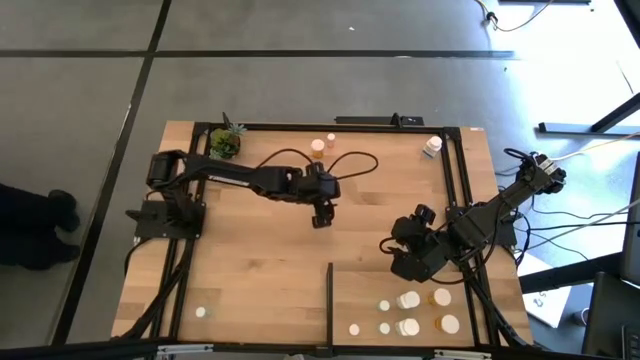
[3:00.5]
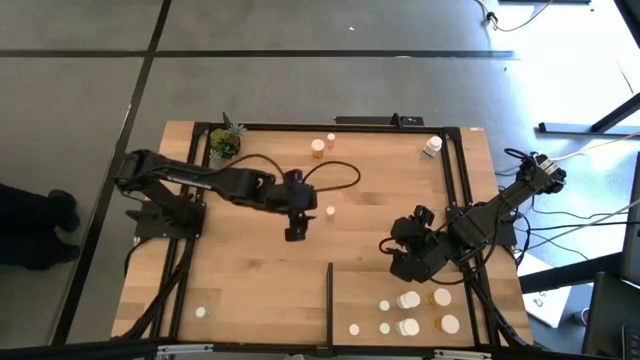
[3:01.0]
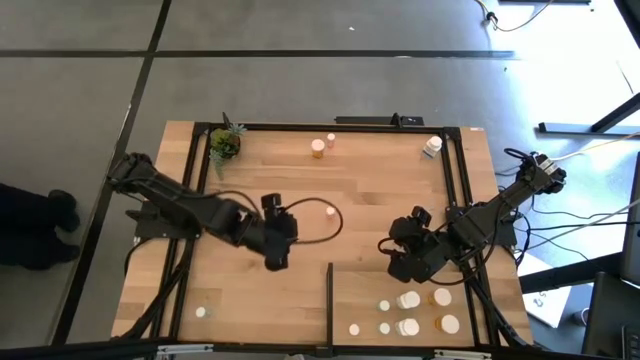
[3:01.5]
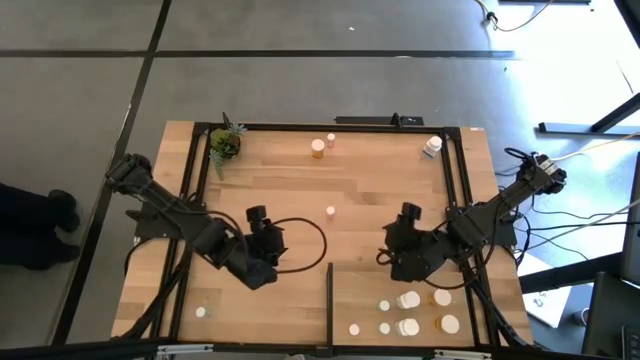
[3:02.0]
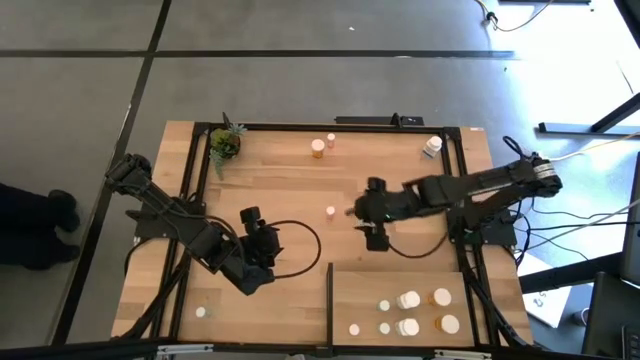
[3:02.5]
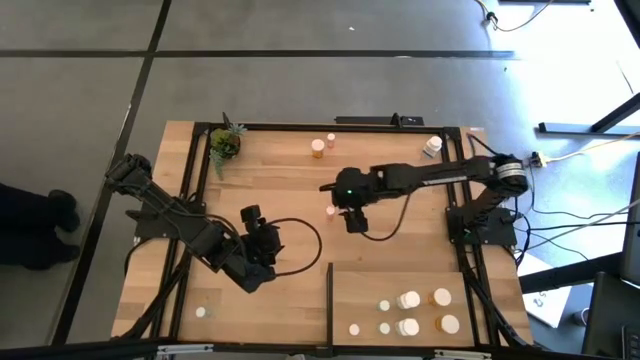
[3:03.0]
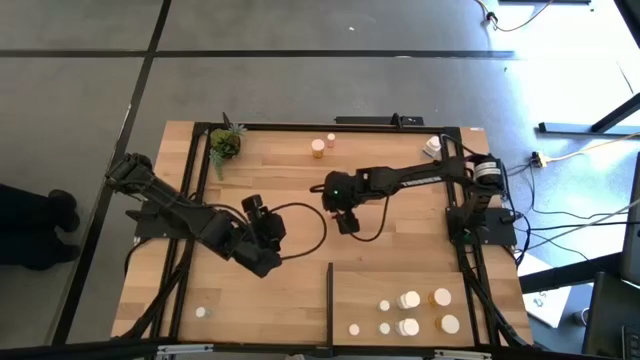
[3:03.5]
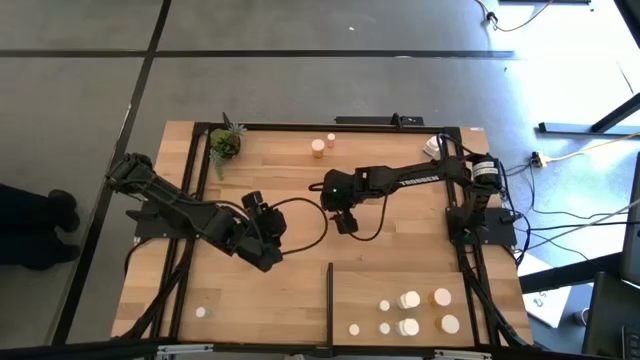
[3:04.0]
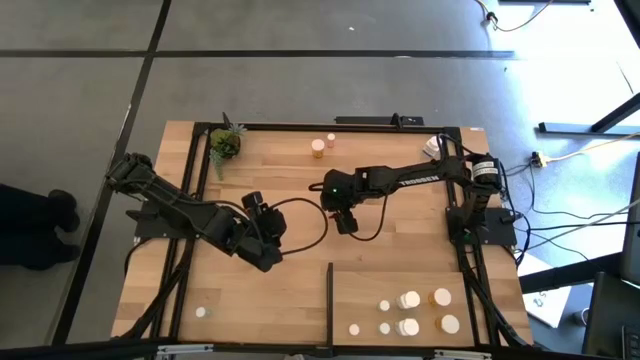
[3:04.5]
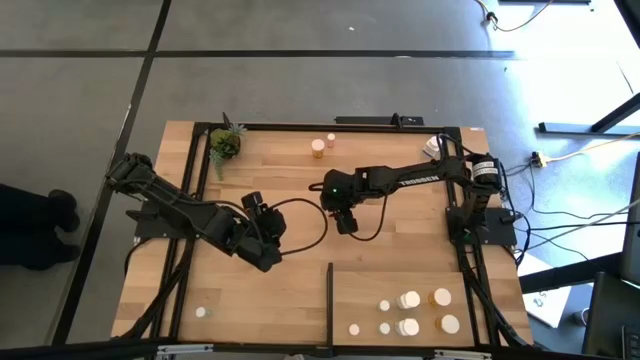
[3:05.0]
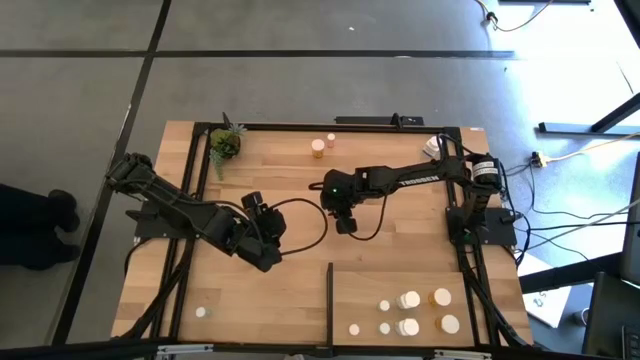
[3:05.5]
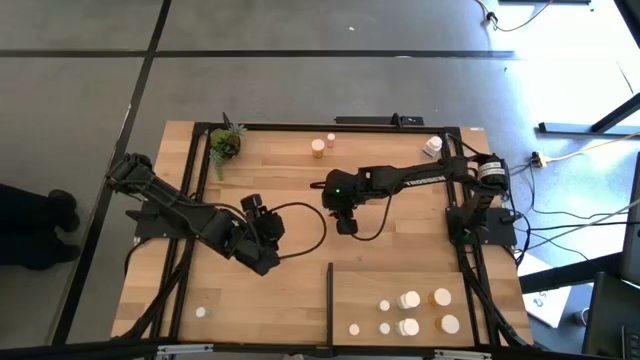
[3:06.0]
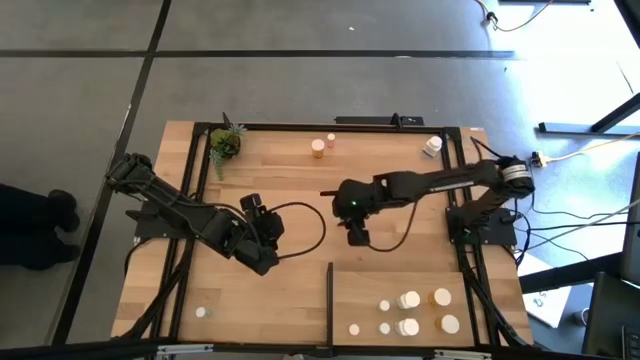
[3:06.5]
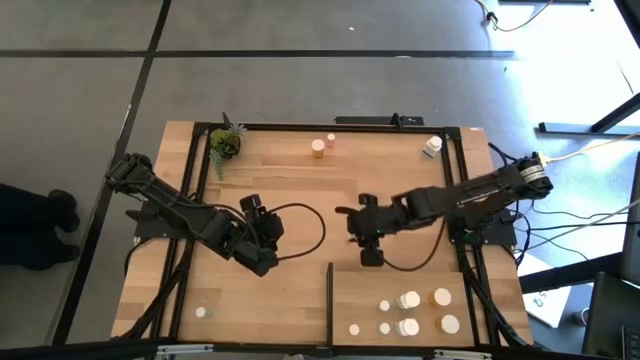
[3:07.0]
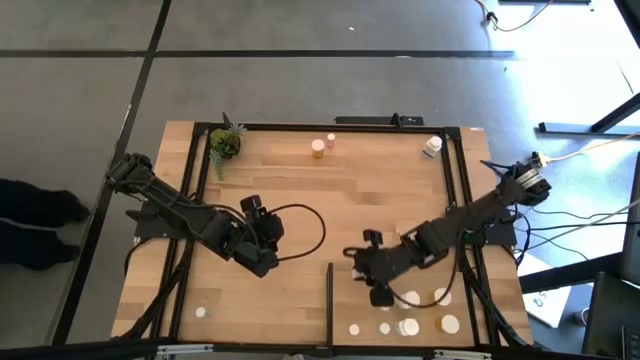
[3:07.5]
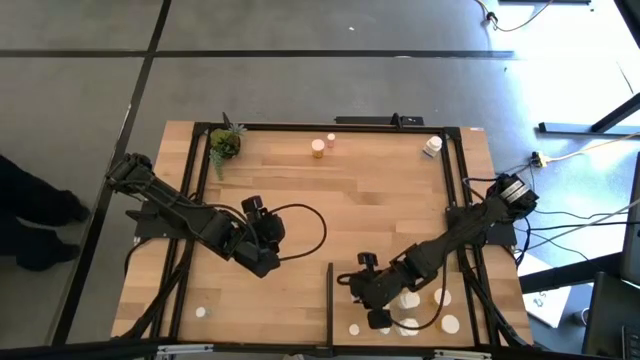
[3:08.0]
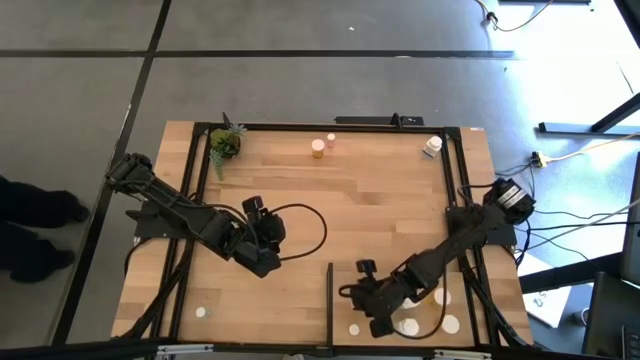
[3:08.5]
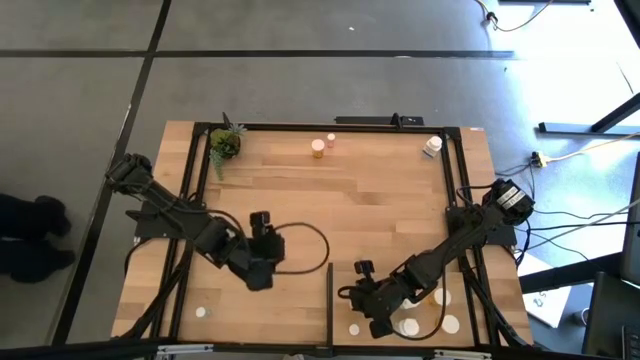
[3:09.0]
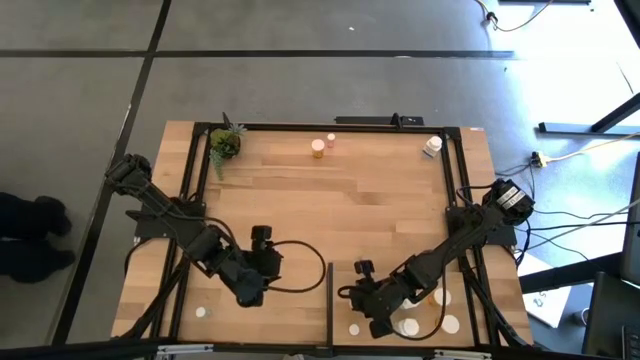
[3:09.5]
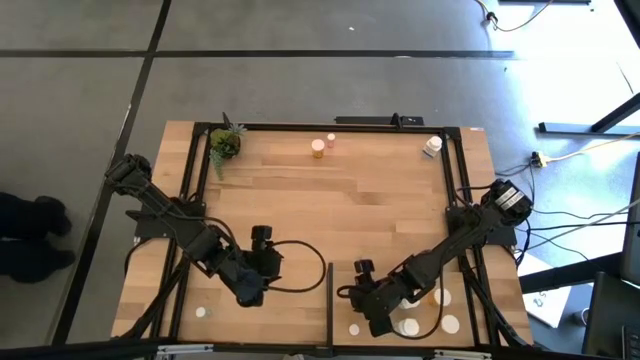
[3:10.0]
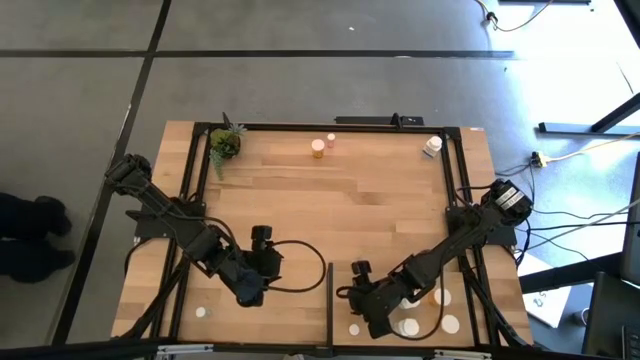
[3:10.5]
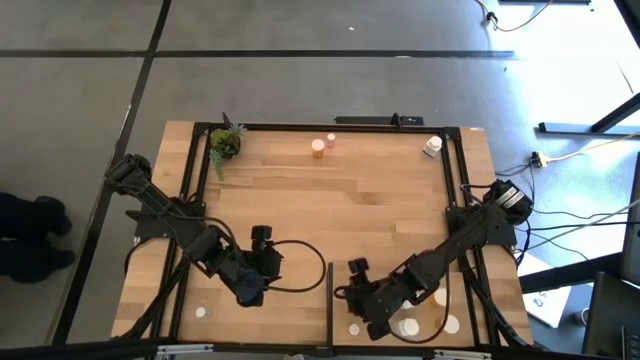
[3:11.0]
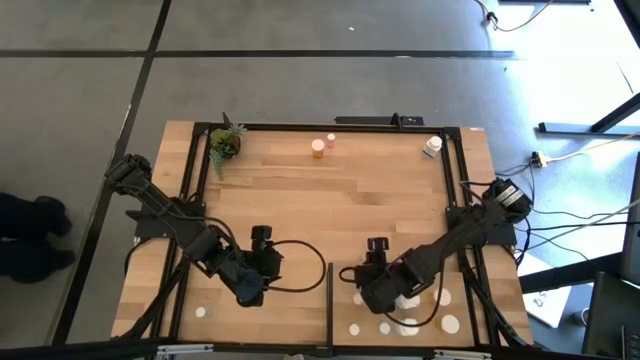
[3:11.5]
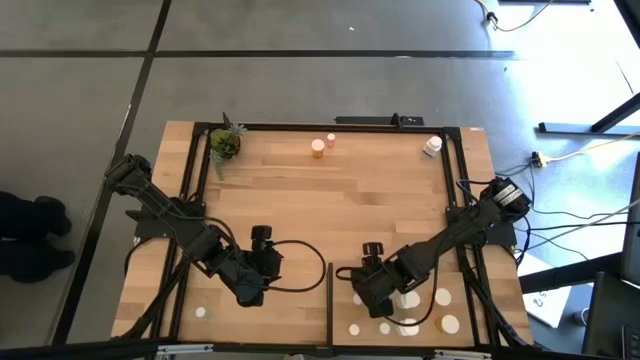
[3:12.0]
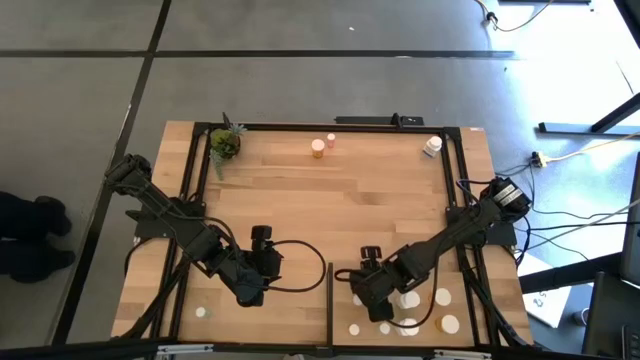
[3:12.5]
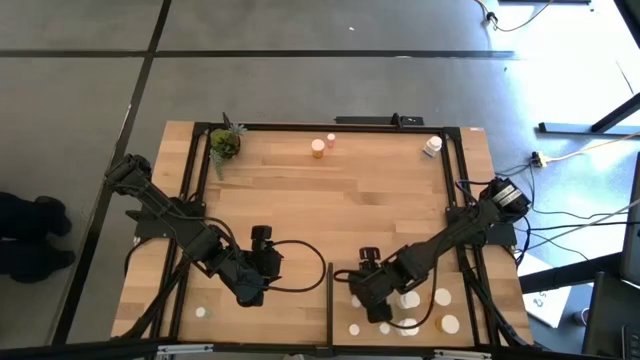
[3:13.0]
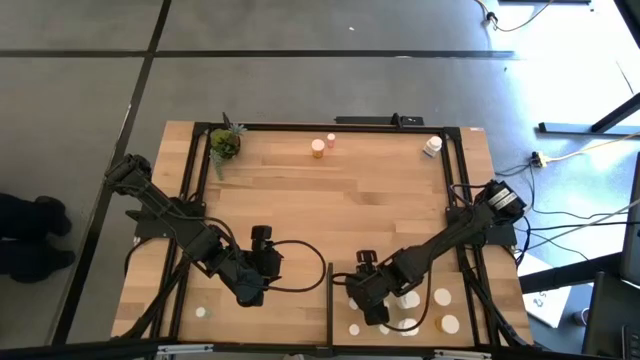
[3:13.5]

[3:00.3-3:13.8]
Task: Pick and place medicine bottles onto shelf by color
Put the bottom pink pill bottle on the shelf aligned with the other pink pill bottle

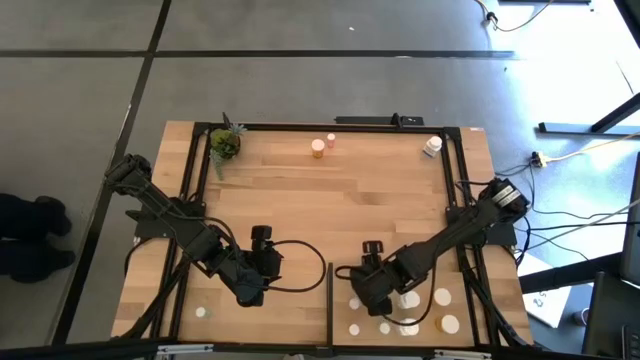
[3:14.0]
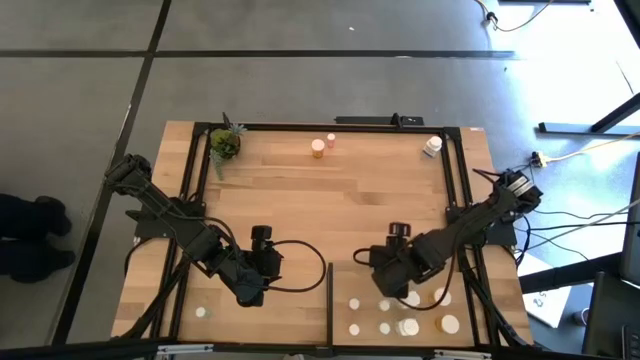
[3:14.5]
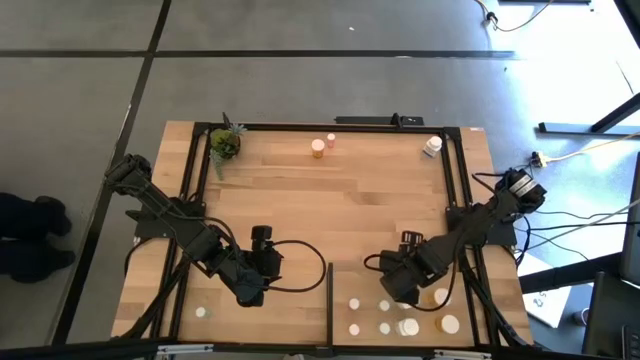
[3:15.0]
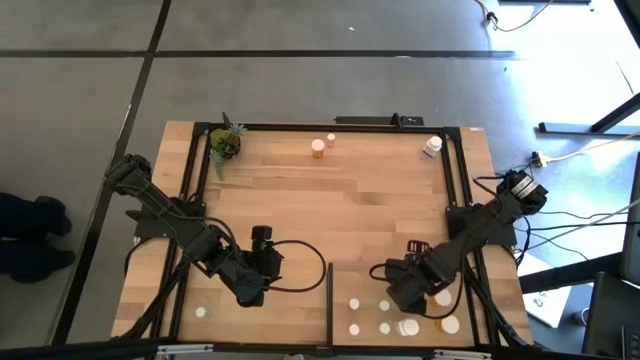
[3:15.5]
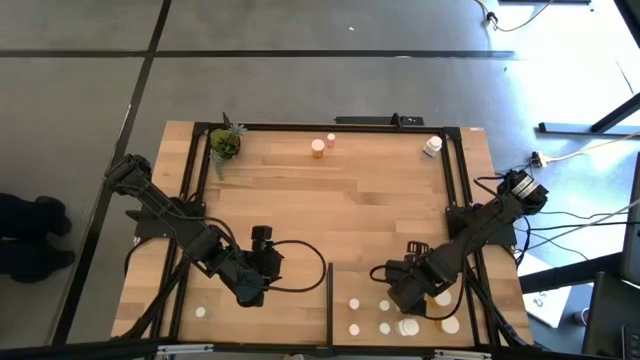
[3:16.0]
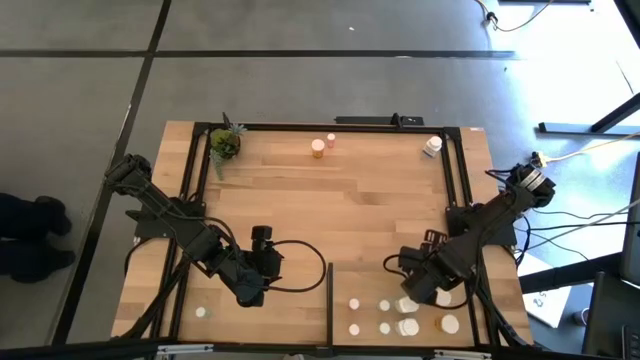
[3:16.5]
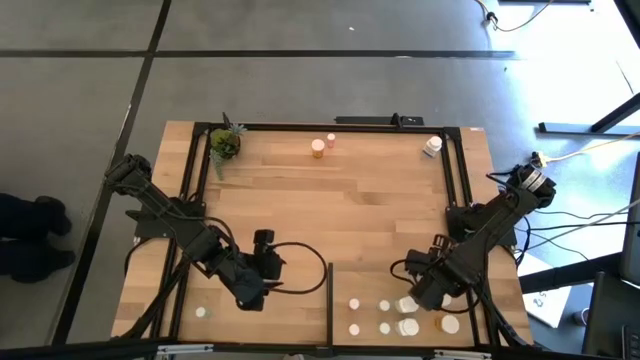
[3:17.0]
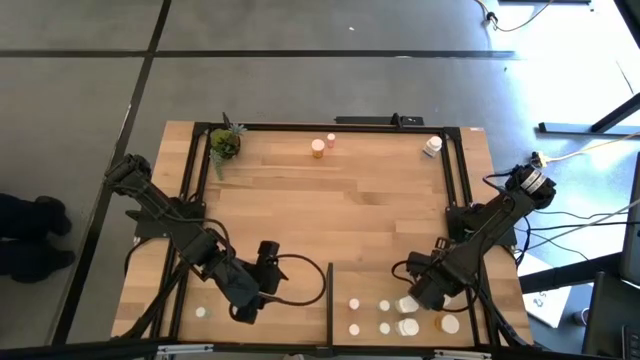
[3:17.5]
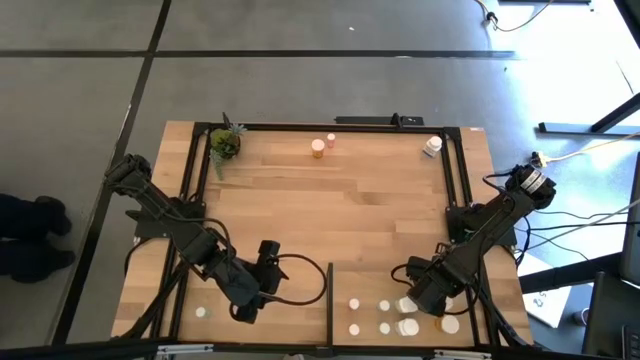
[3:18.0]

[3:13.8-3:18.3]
Adjust the pill bottles on the shelf

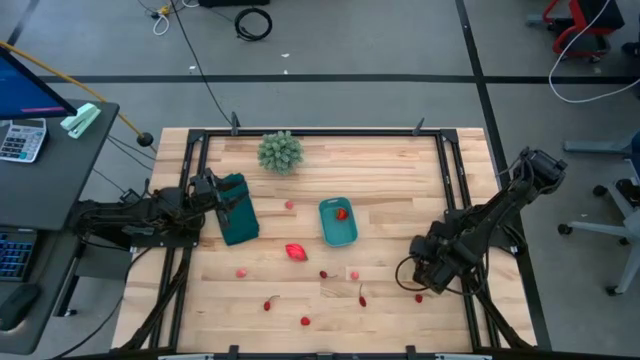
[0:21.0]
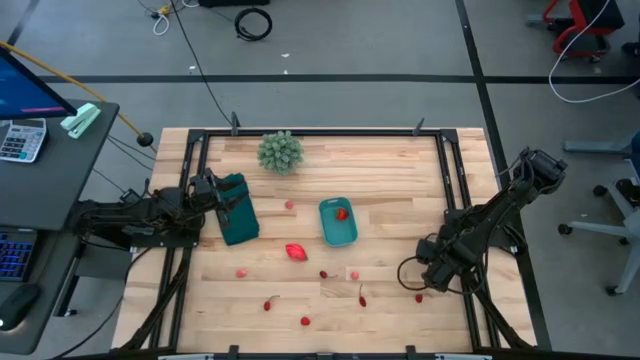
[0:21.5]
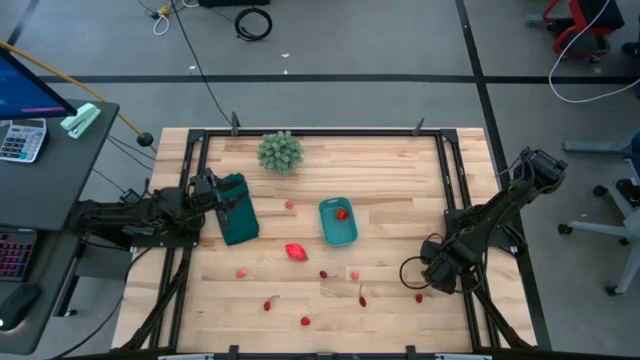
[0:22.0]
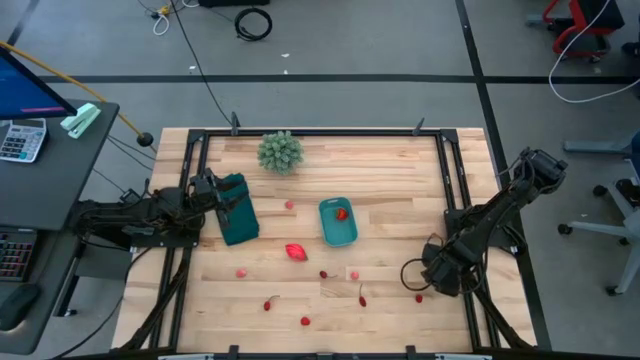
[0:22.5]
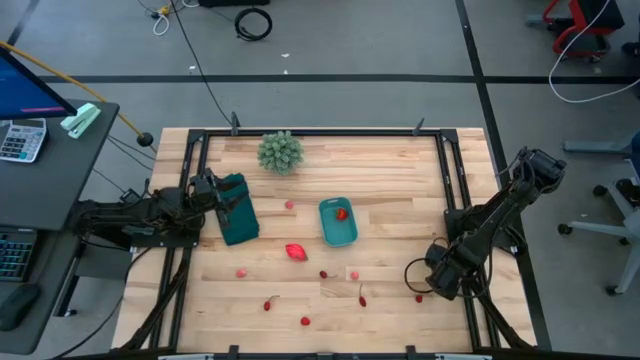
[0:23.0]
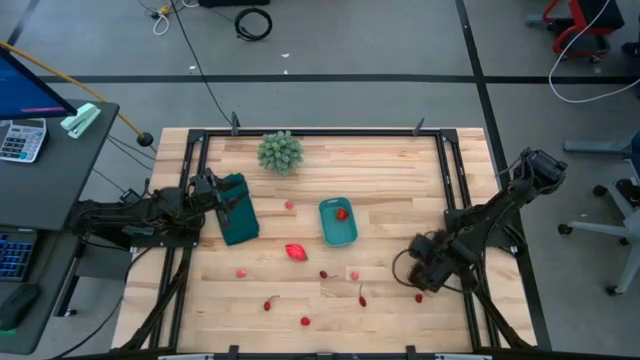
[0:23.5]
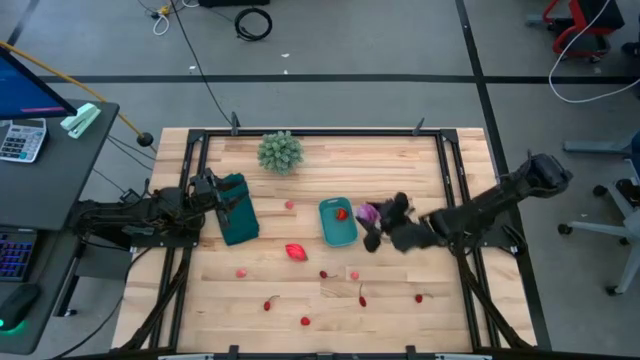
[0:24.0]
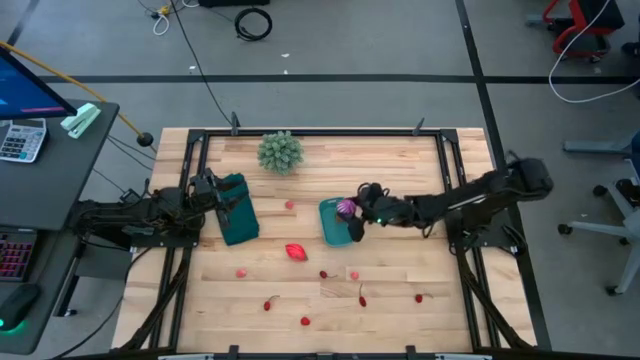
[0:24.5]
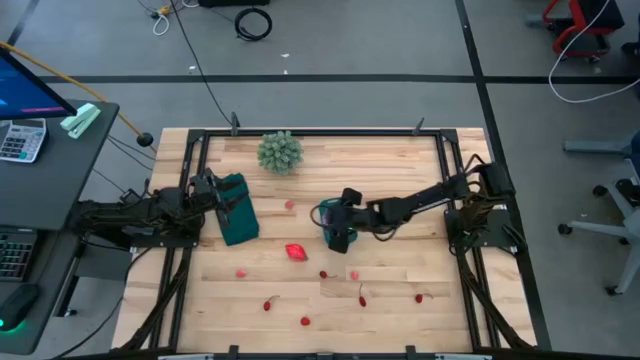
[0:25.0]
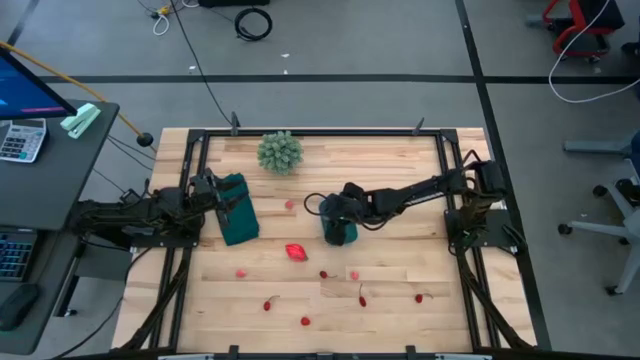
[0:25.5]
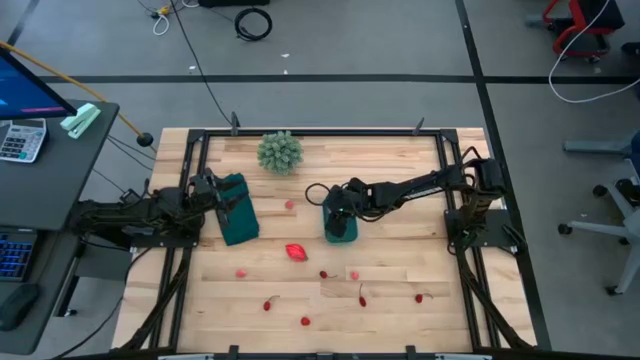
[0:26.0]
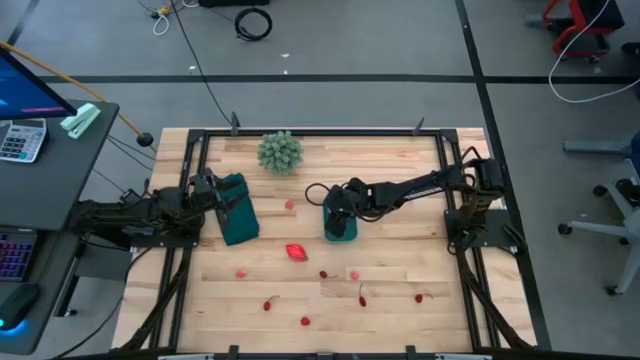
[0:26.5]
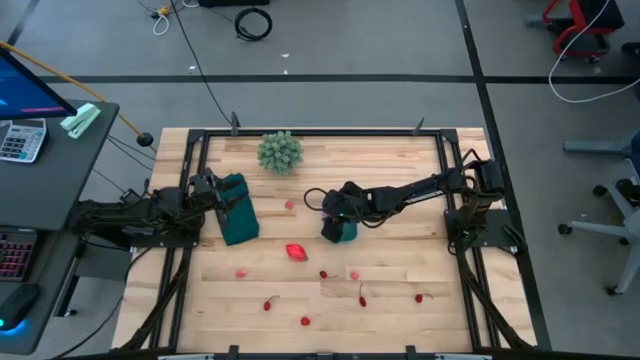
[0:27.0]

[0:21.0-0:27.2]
Task: Pick and placing Produce into tupperware
Put the purple onion into the blue bin
